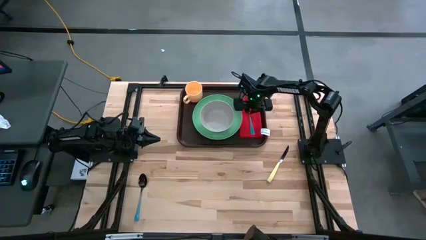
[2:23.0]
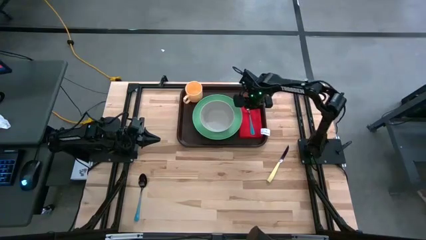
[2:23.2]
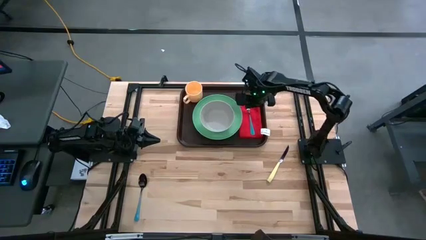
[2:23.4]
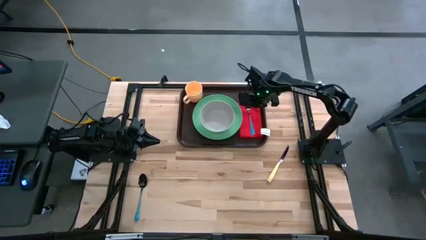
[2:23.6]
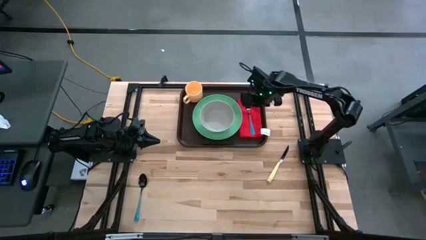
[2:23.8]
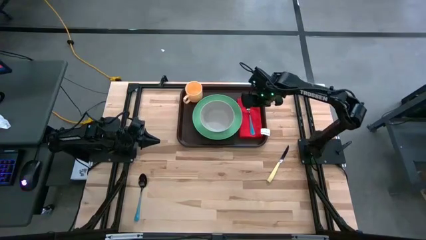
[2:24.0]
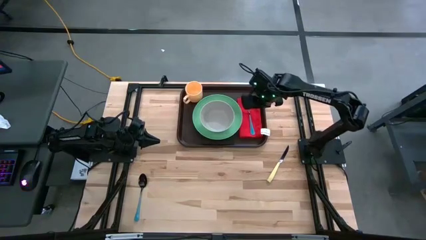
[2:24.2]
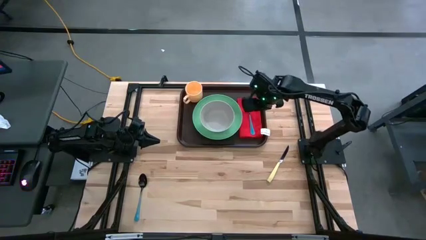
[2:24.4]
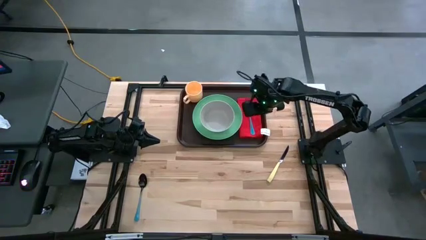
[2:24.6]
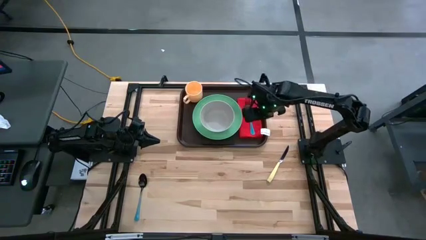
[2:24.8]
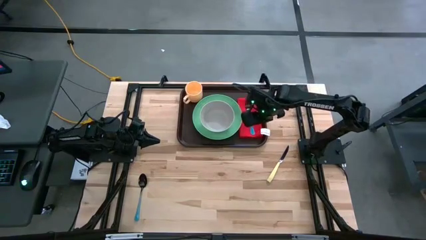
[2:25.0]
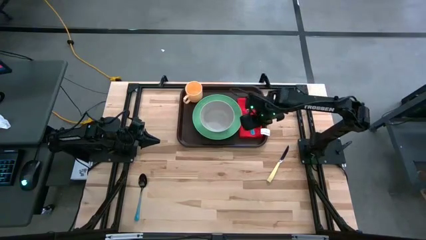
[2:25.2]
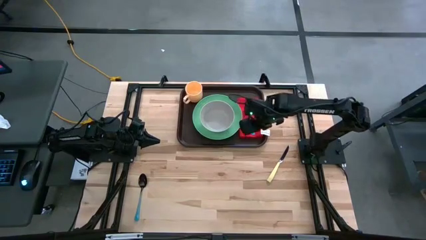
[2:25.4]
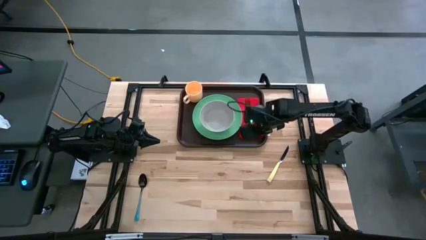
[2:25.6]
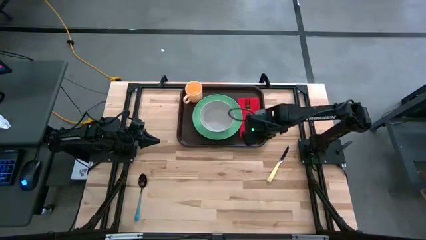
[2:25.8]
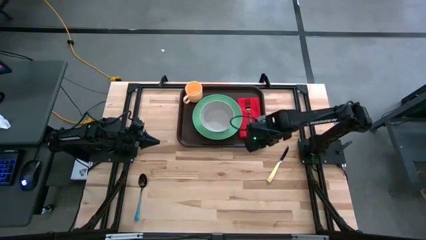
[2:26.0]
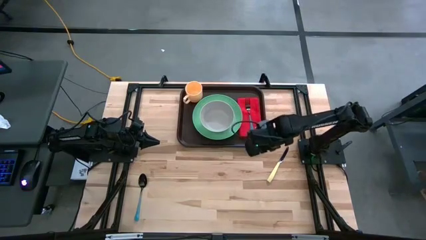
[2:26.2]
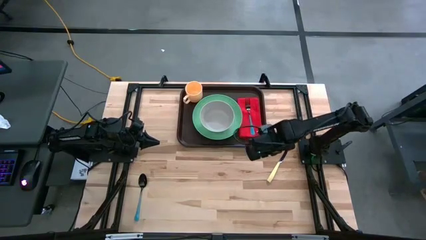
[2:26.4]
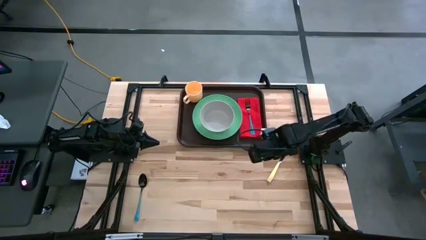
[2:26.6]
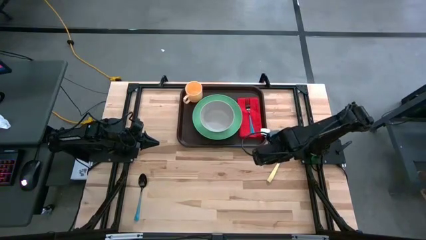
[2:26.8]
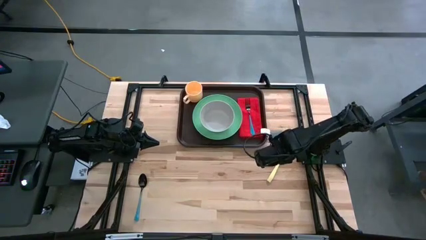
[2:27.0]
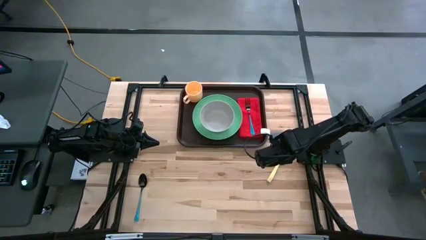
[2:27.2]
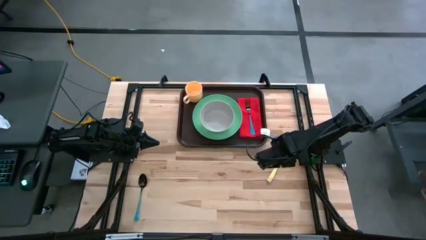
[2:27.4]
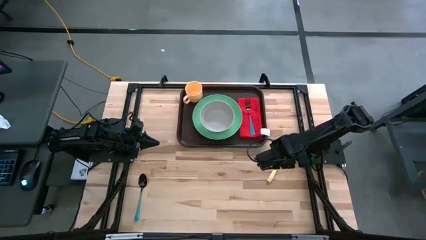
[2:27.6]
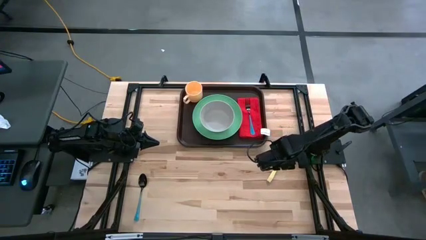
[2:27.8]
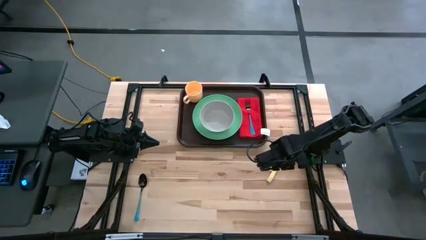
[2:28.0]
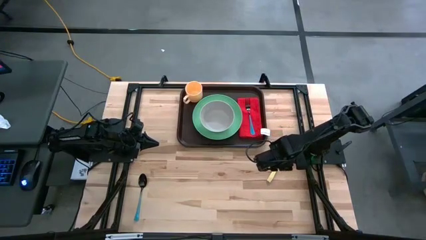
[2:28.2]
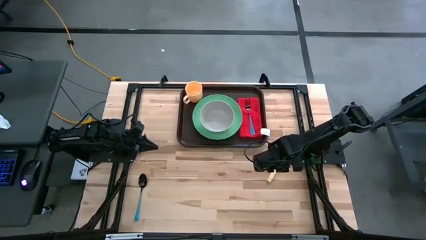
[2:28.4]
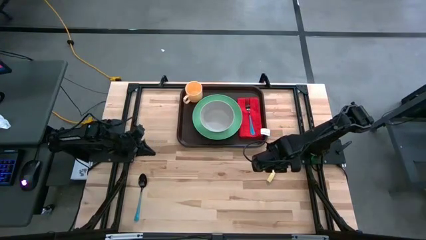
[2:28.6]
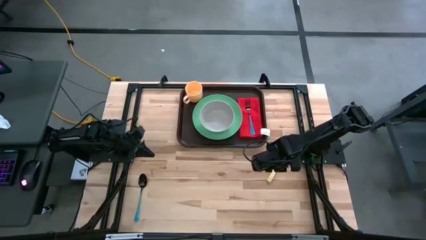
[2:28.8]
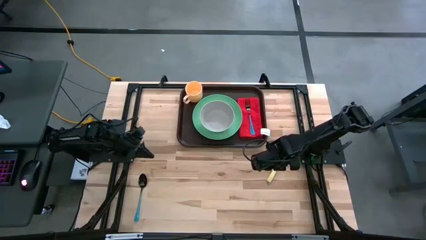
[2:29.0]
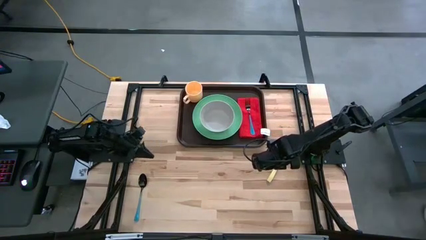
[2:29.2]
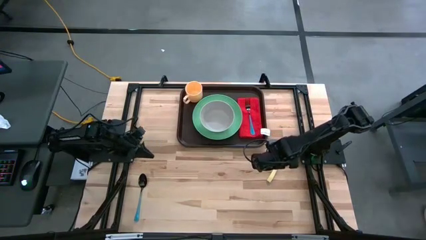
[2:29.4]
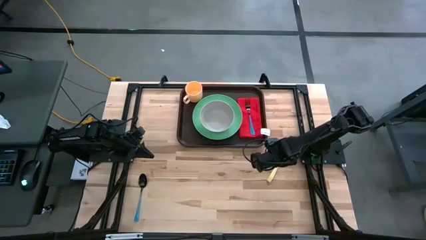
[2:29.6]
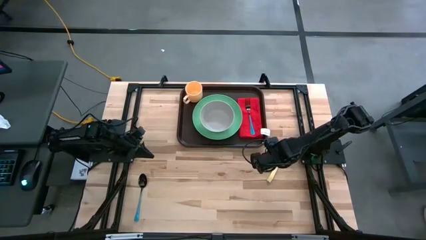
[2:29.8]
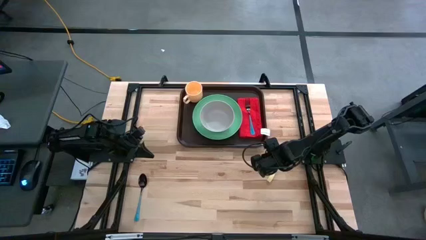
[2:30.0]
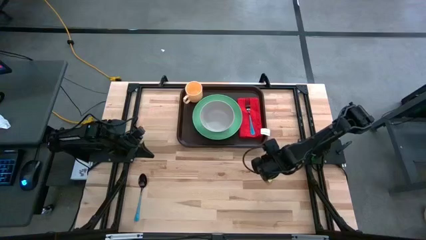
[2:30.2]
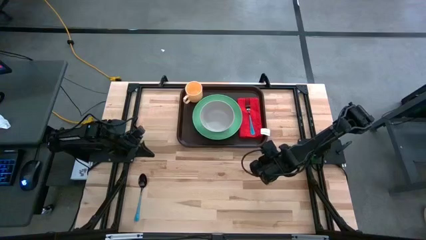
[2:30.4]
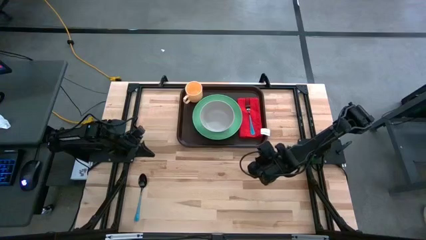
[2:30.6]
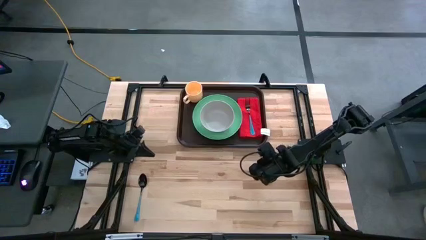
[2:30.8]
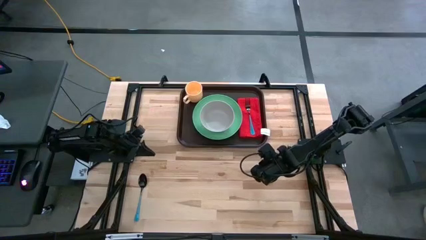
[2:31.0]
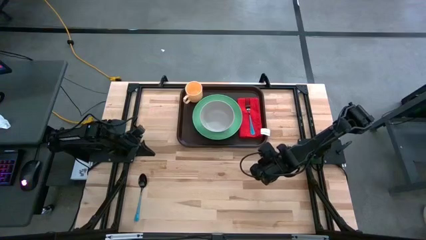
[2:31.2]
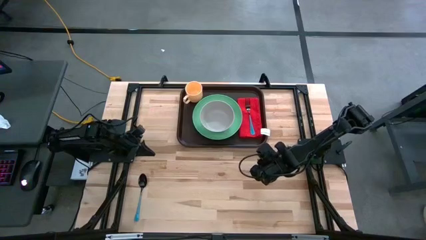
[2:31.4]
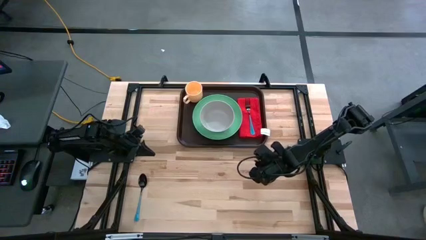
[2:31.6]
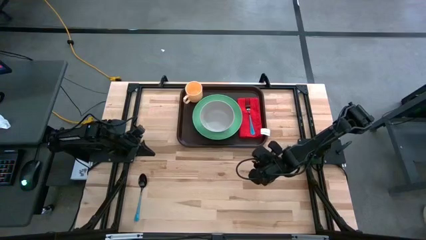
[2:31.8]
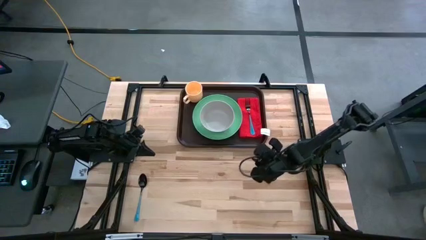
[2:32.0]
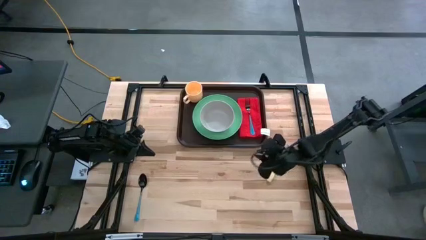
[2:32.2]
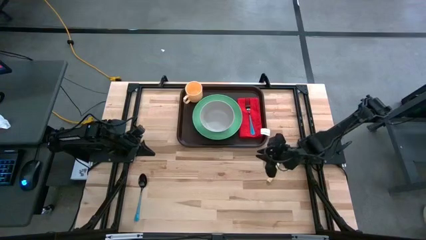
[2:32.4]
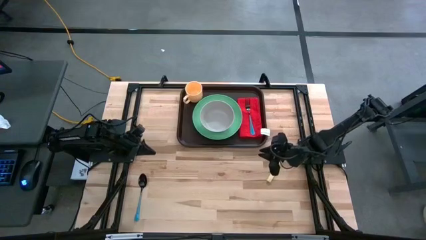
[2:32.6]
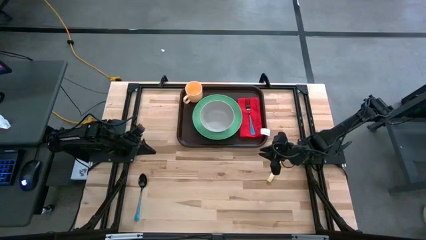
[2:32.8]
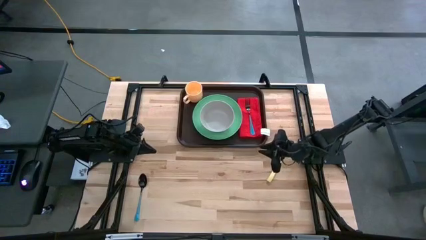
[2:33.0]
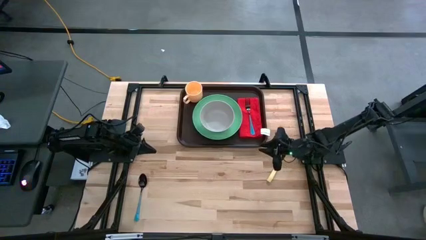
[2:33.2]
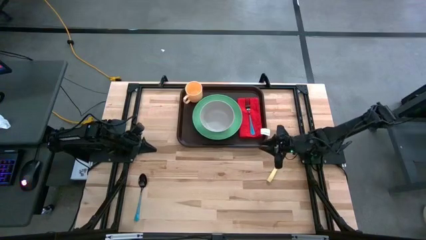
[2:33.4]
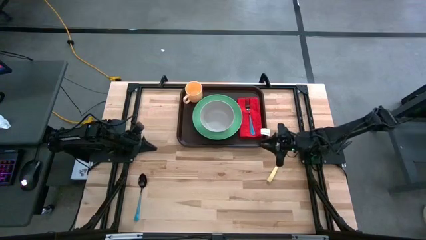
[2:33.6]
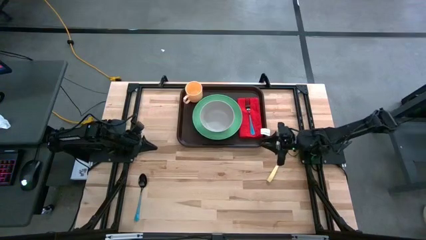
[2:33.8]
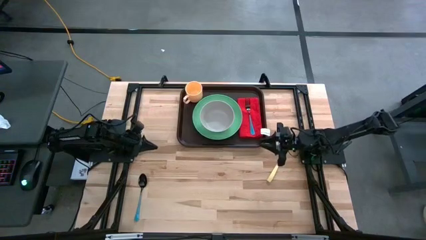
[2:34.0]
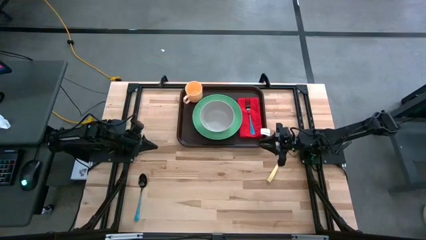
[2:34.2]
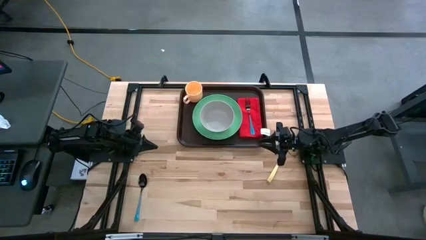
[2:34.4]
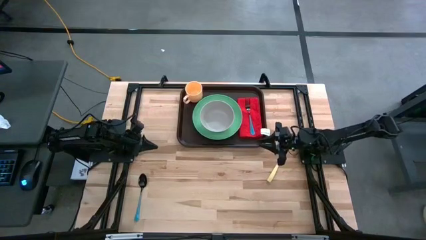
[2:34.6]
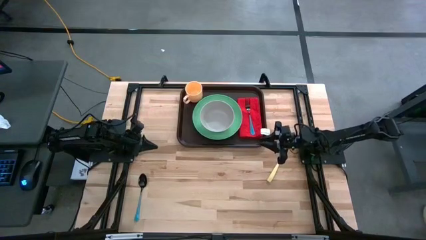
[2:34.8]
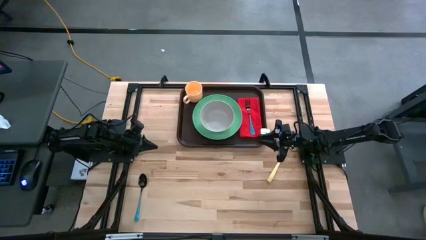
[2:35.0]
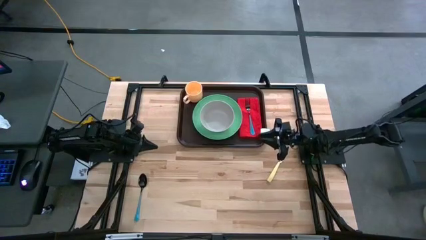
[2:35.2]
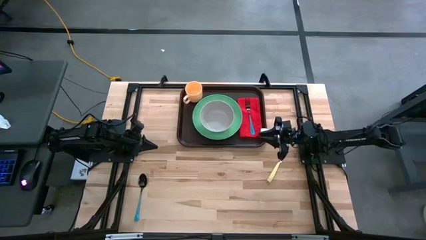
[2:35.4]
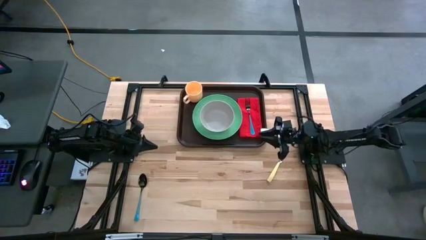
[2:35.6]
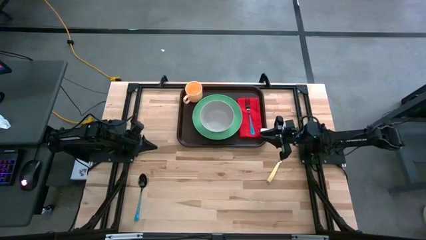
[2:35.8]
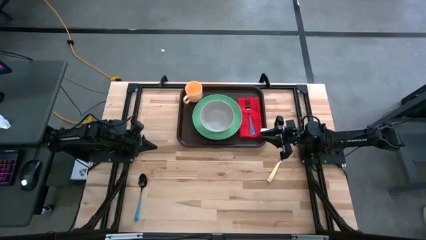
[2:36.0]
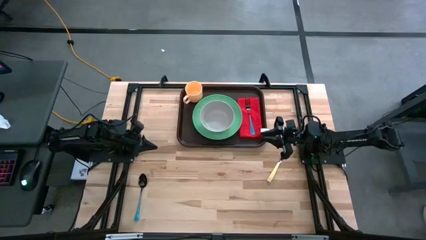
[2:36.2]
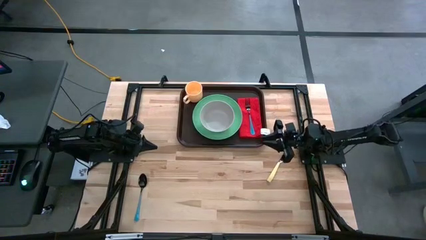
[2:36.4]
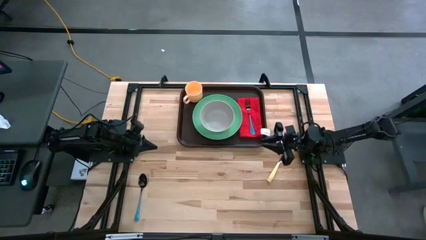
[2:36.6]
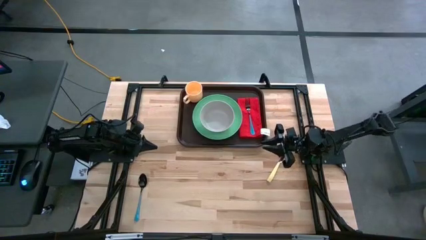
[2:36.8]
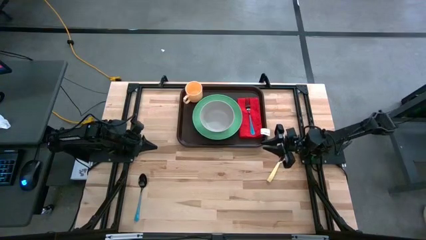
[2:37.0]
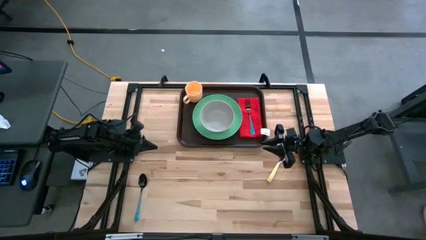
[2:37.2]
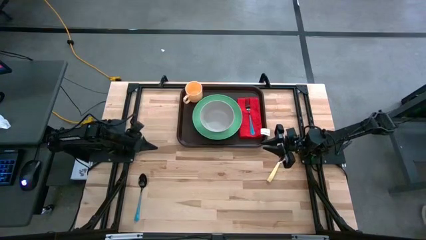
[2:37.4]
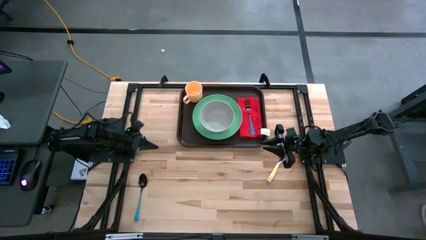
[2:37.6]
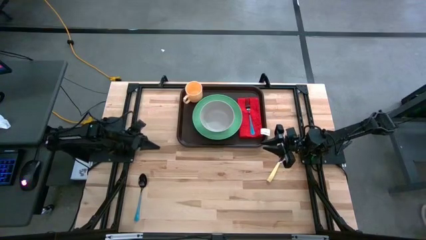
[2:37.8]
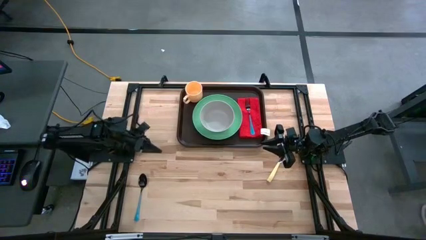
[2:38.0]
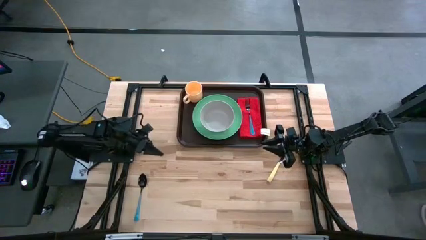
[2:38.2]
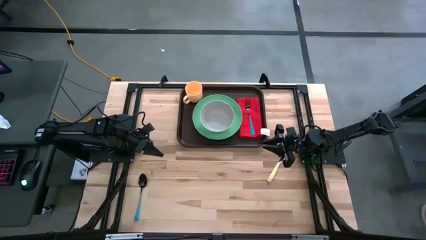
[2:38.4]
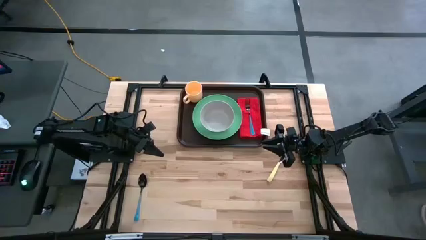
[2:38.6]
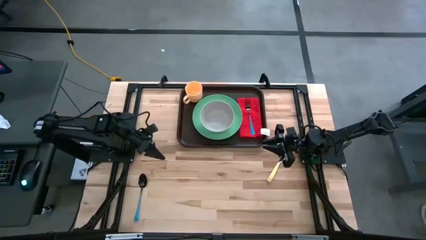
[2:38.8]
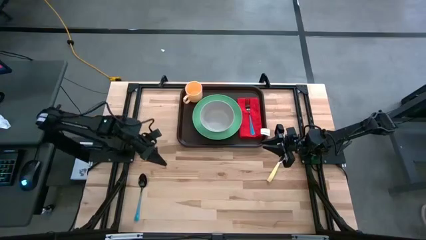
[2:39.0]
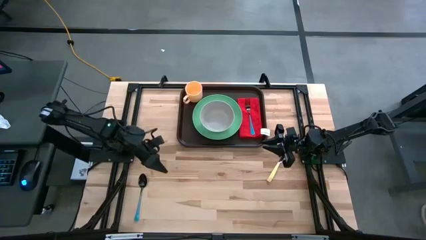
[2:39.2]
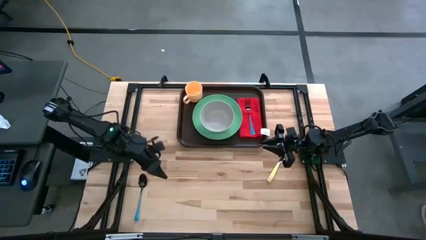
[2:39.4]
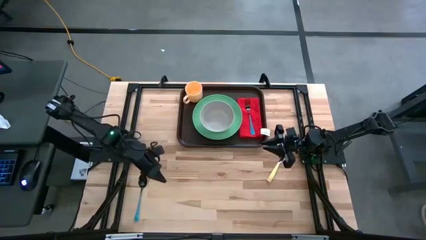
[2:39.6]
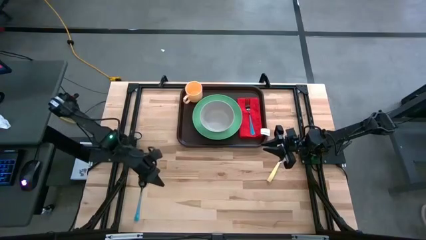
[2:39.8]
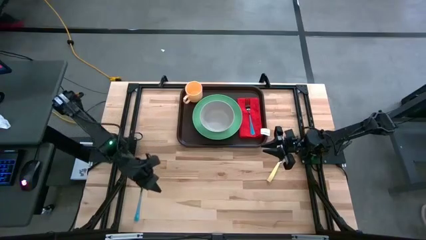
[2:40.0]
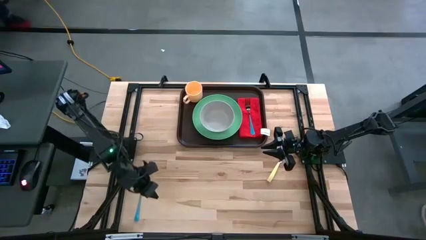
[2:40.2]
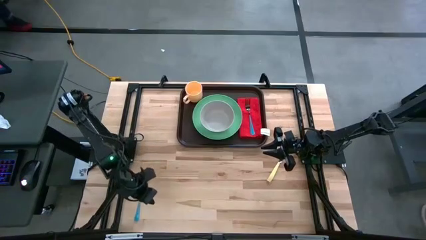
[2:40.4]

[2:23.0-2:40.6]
Task: Set up tray
Put the blue spoon on the red table napkin to right of the green plate
